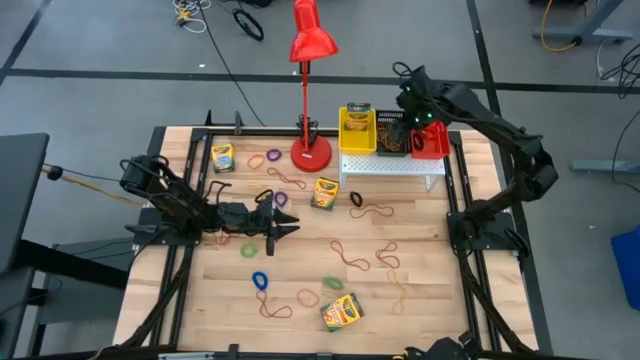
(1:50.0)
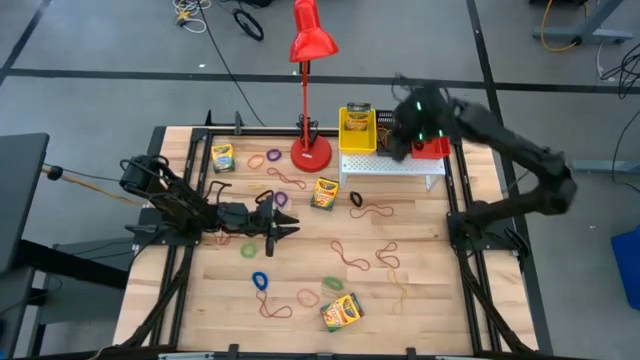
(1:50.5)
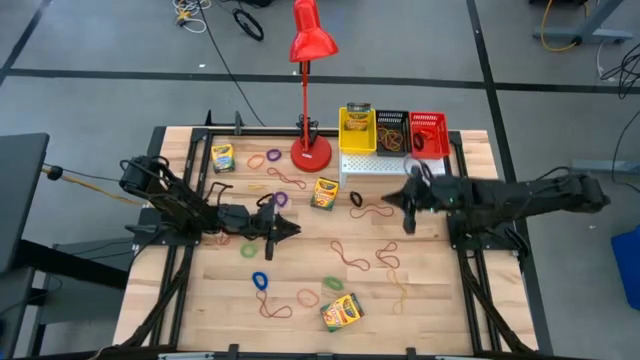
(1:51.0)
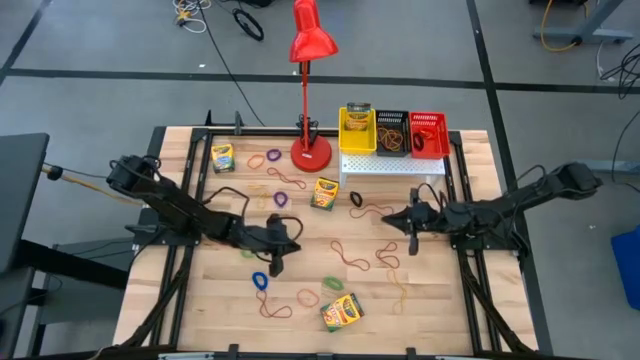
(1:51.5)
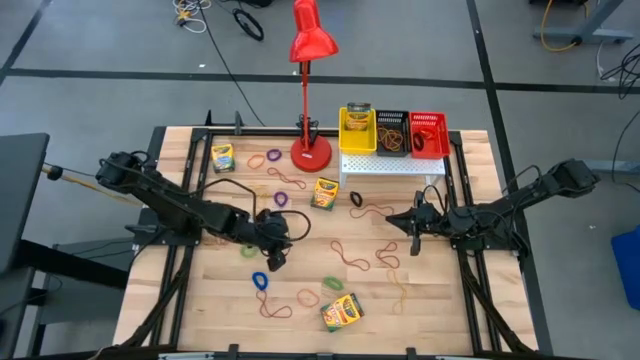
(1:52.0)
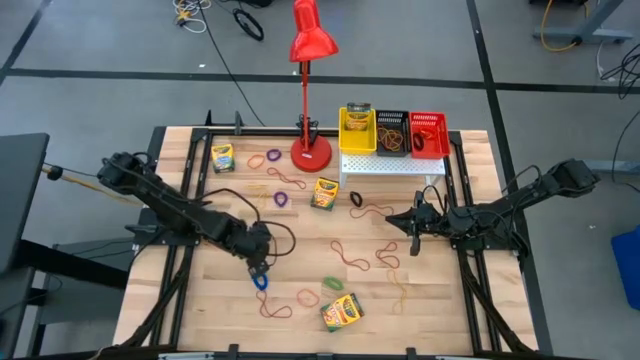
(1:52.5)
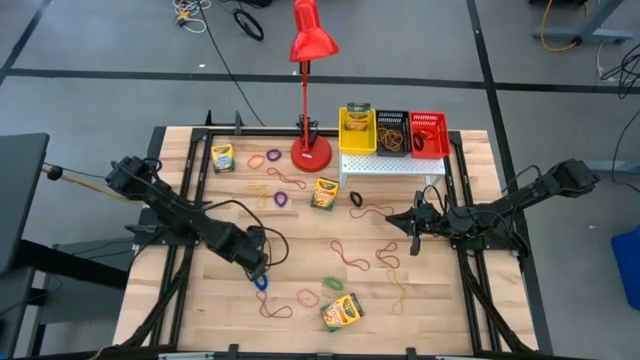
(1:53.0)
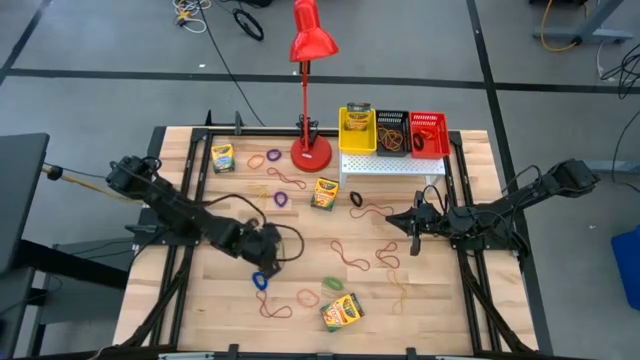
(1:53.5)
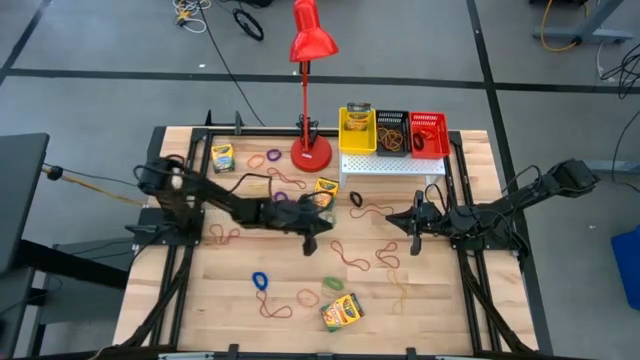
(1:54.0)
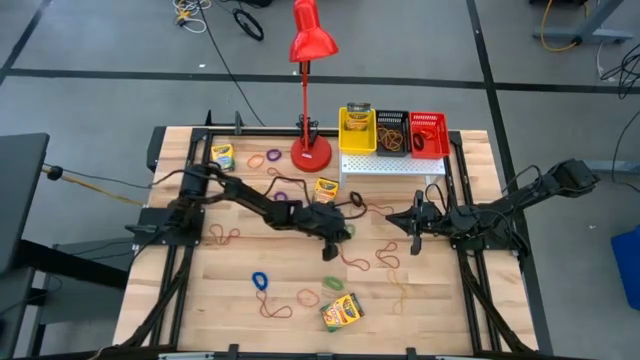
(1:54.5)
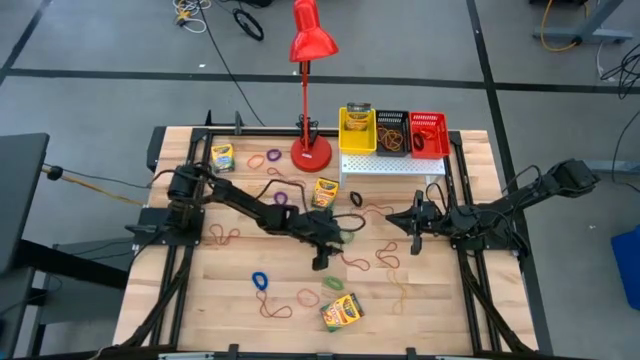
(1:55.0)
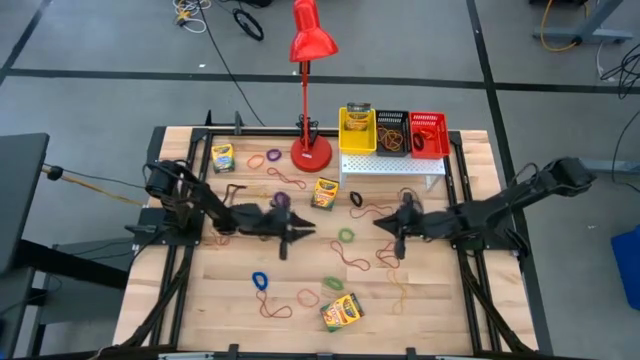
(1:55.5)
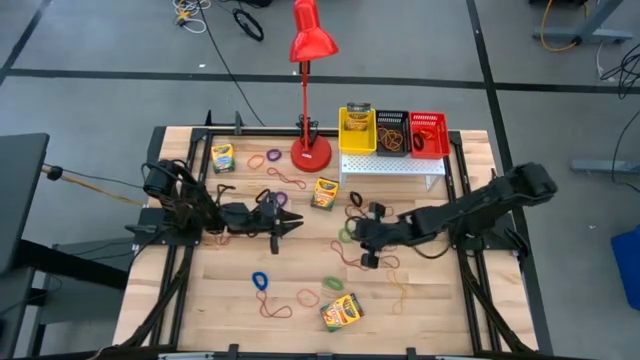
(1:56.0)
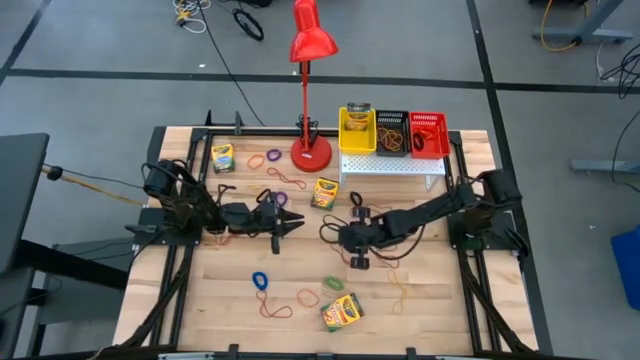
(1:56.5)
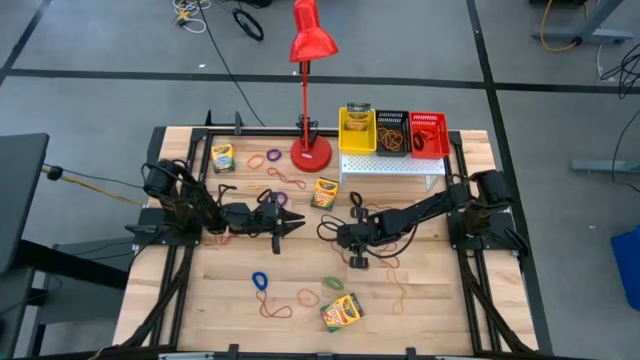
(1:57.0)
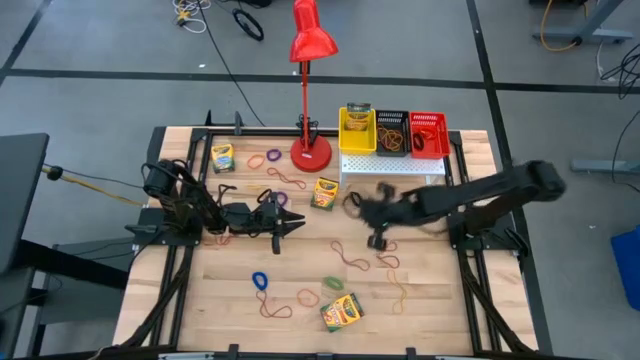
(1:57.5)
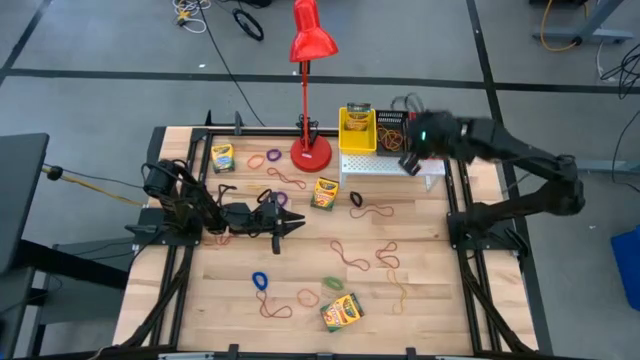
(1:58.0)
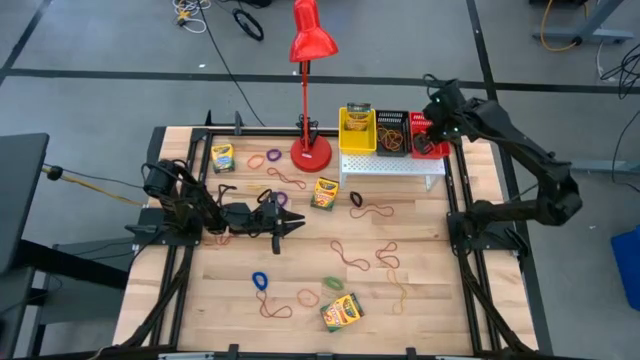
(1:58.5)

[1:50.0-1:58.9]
Task: Pick & Place Office Desk Supplies
Put the green spring keychain into the red bin on the shelf

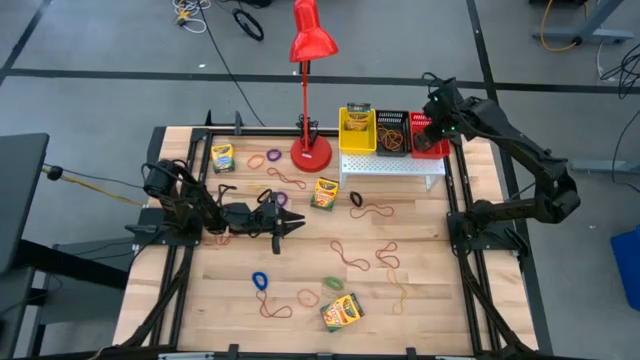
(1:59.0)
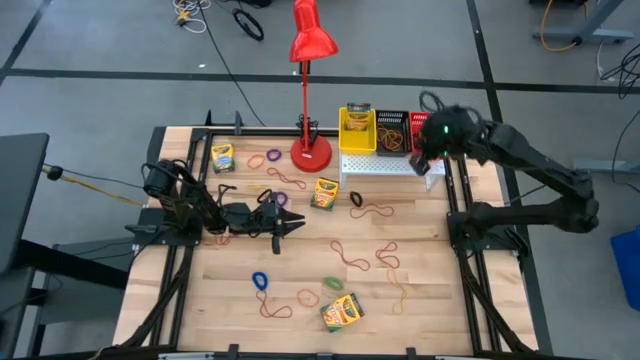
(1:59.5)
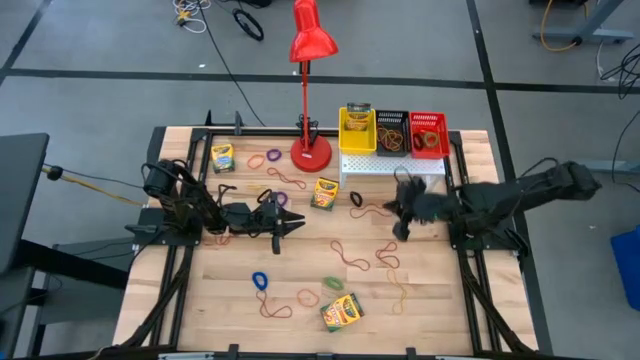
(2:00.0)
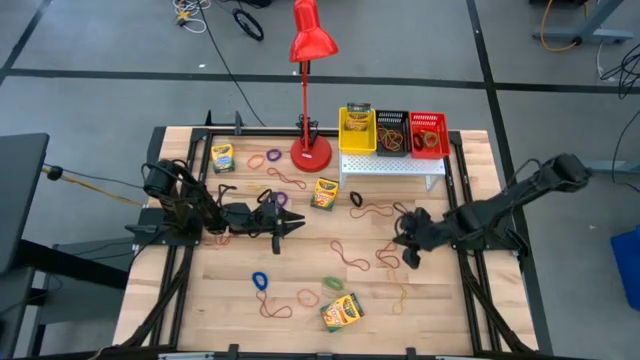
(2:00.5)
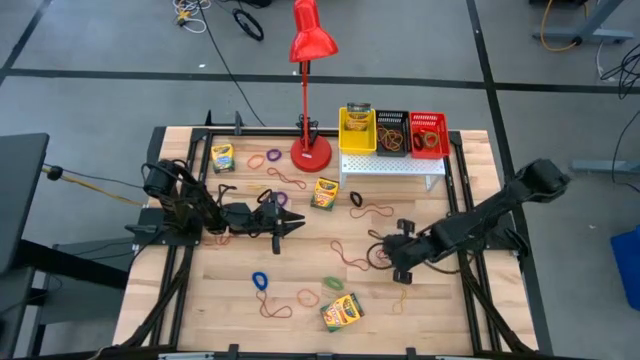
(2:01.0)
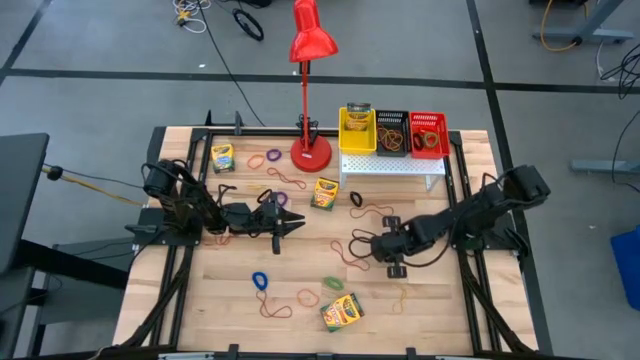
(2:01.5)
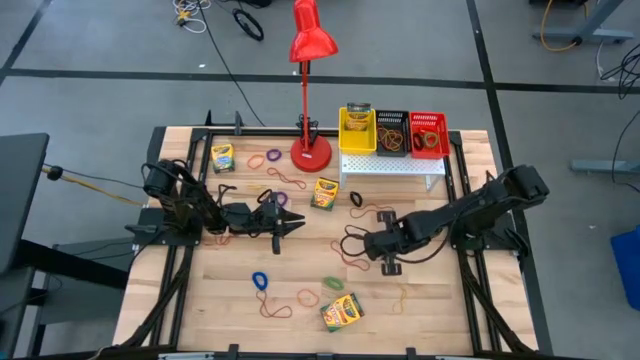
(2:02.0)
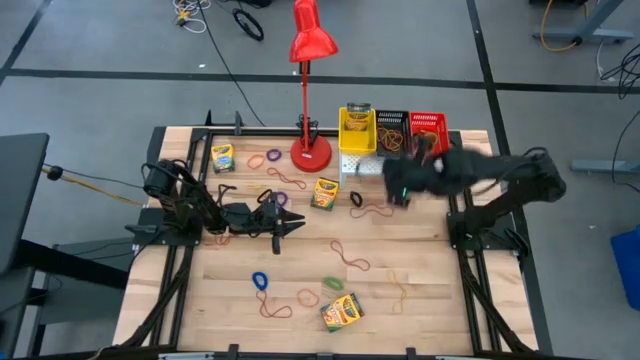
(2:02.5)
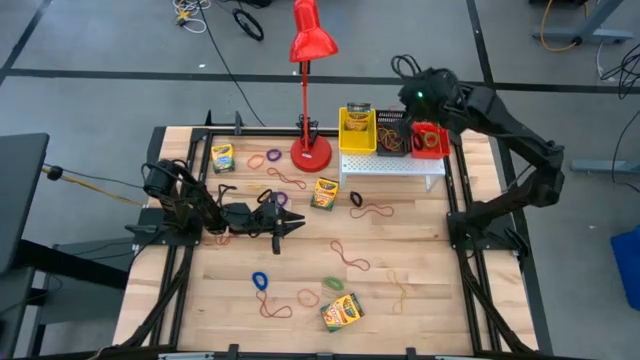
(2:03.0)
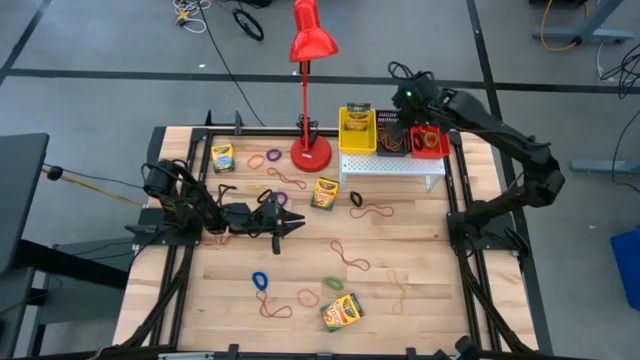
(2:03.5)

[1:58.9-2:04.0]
Put the red rubber band into the black bin on the shelf

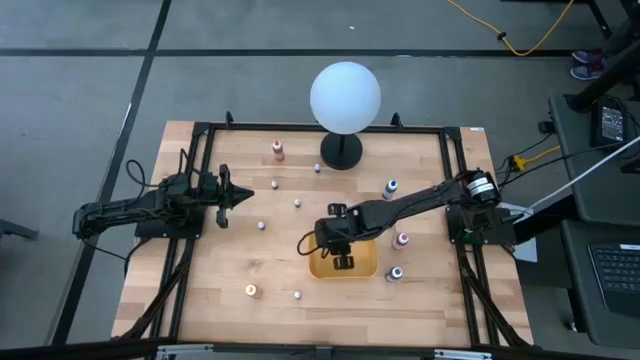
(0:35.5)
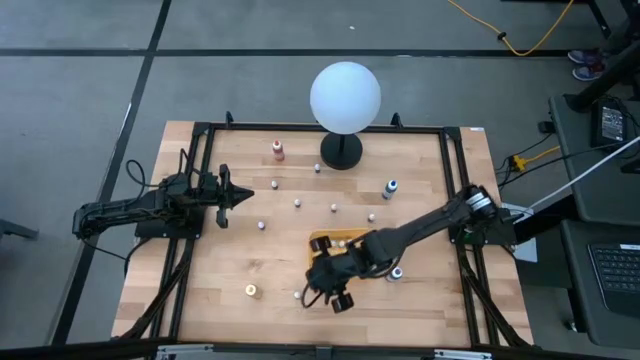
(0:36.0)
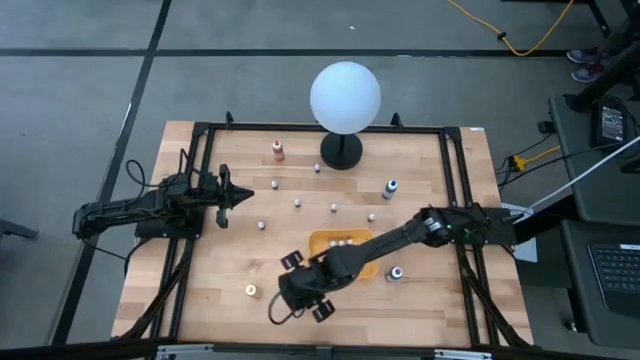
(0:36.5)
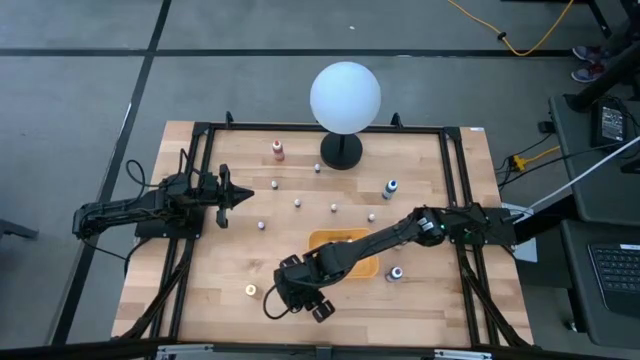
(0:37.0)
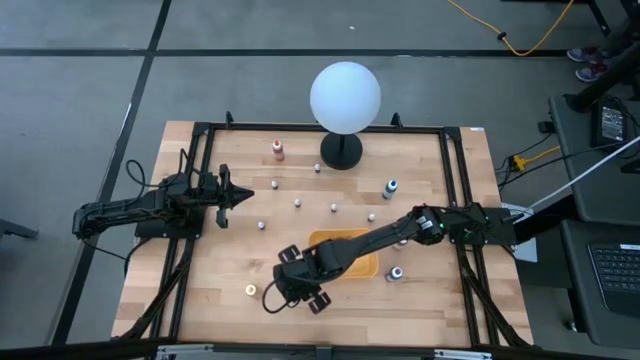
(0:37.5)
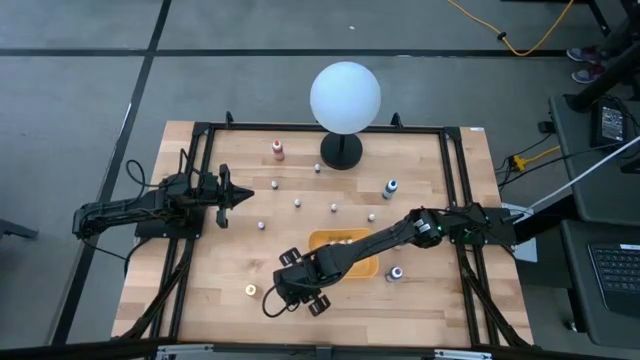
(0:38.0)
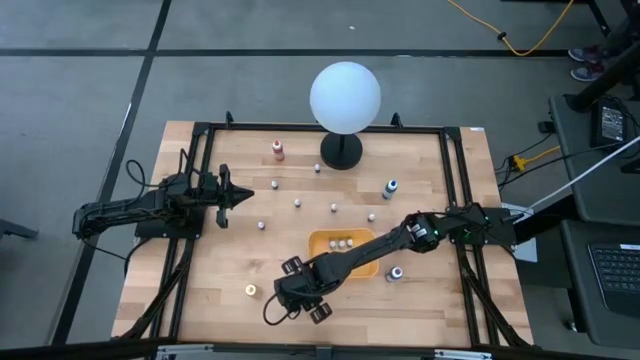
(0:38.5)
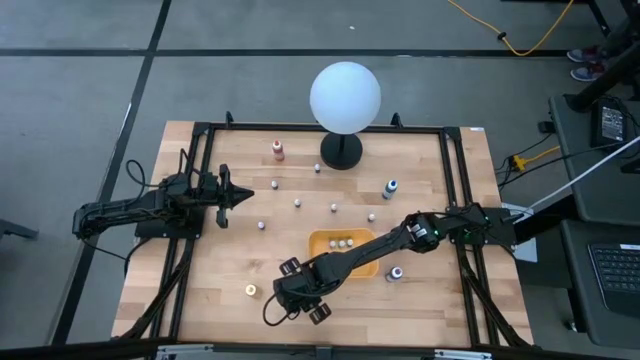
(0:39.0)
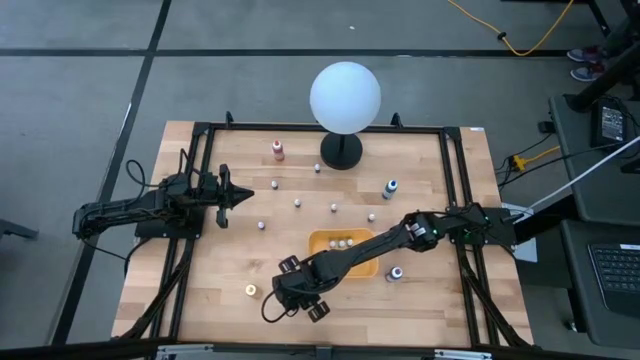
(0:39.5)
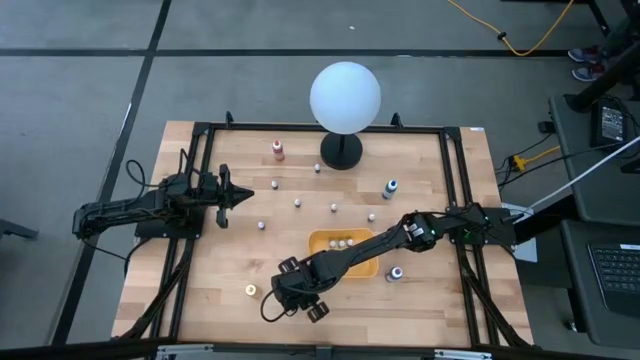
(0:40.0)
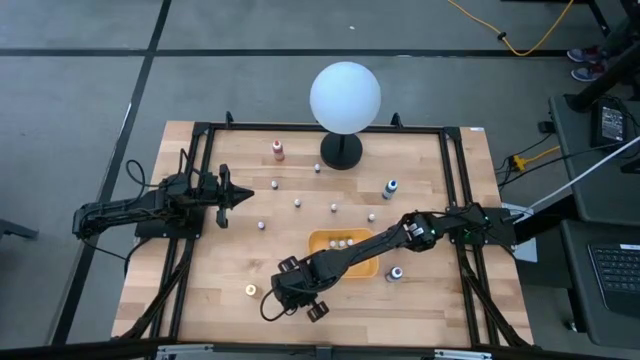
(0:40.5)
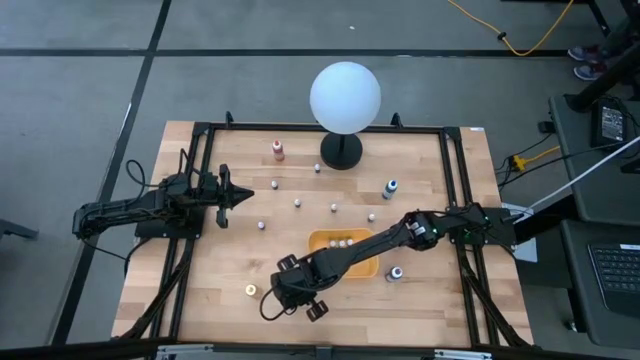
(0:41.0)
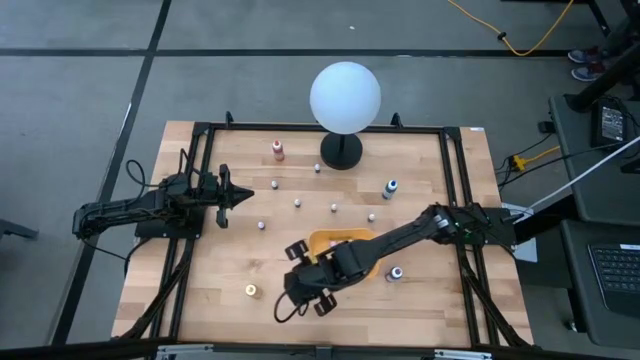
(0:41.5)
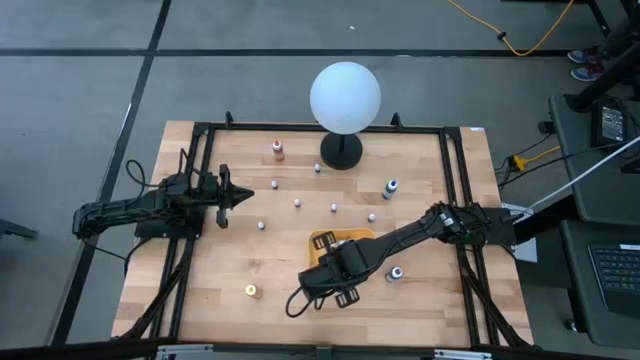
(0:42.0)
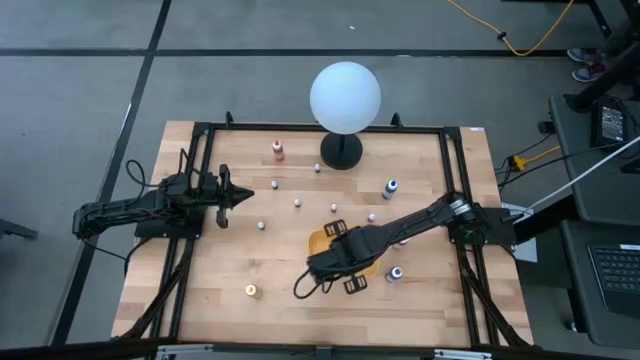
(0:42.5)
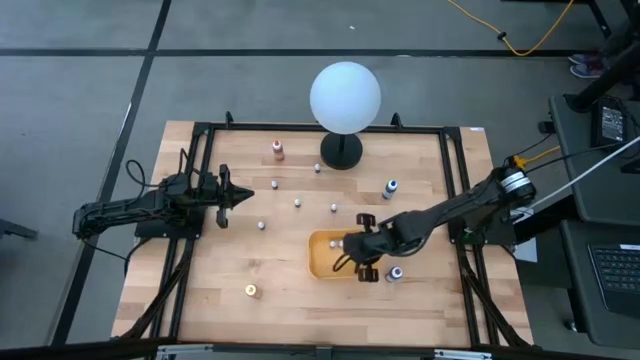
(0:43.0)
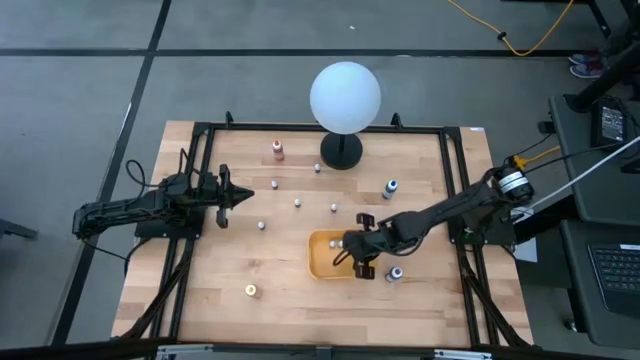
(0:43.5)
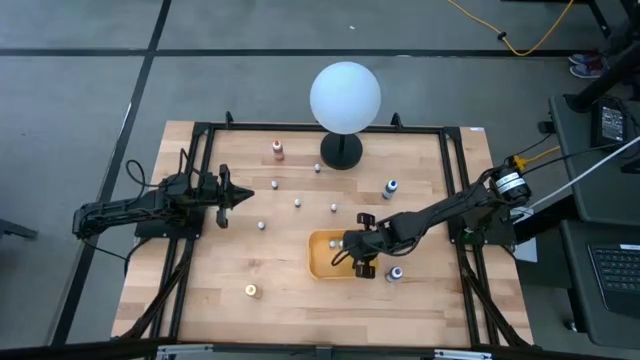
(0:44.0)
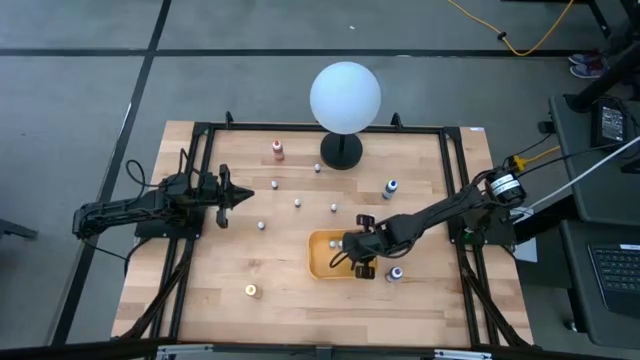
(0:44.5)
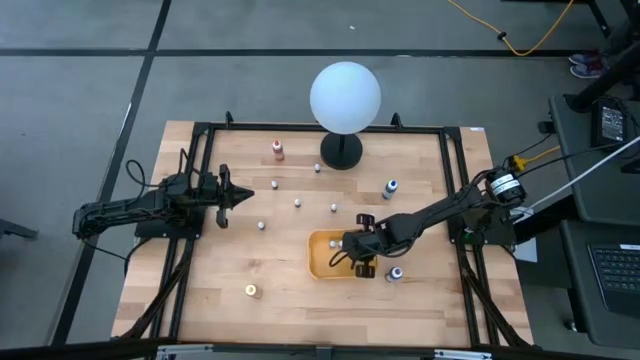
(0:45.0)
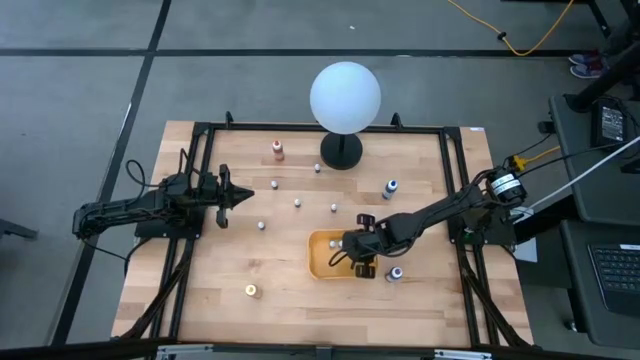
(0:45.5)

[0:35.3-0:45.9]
Task: Pick & Place food coloring
Put the small pink food coloring bottle into the yellow bin
